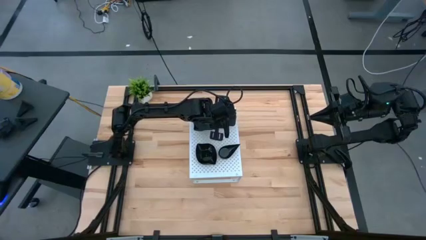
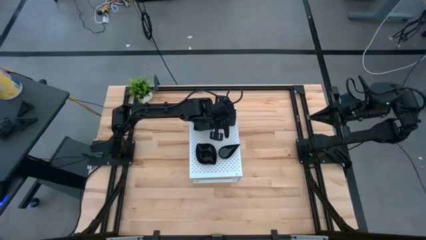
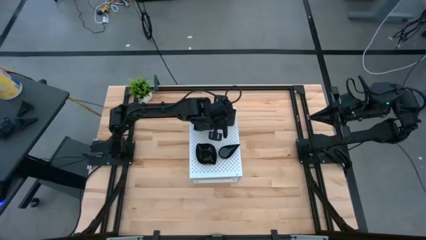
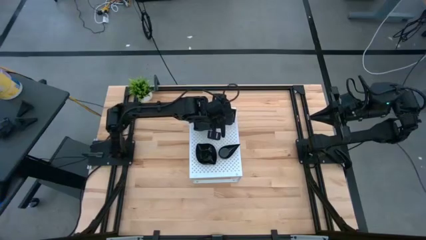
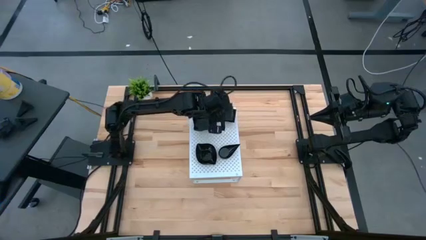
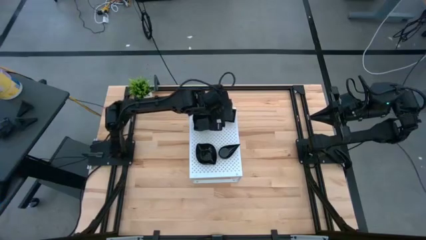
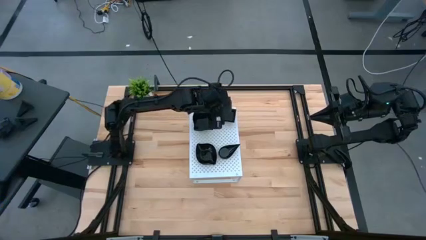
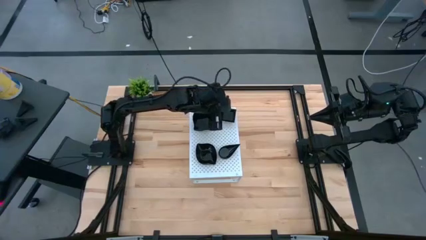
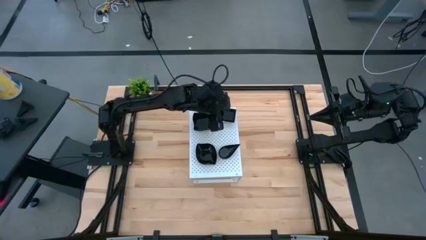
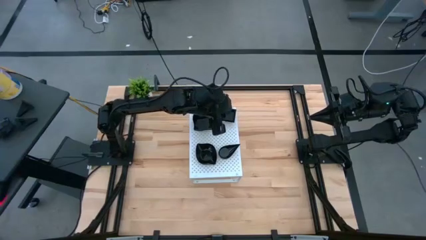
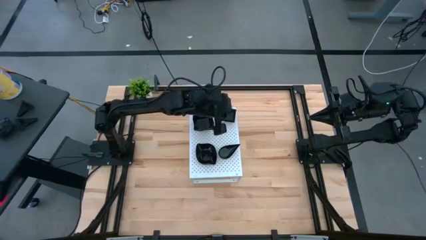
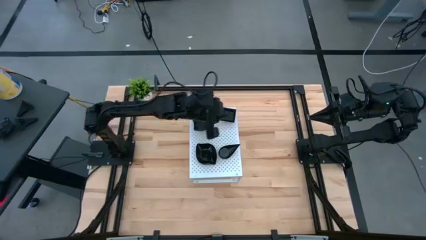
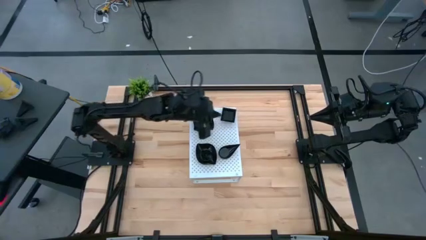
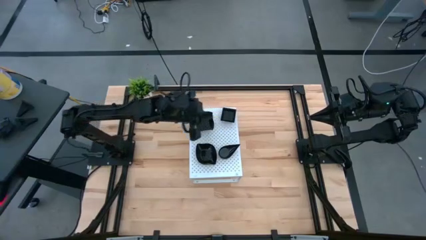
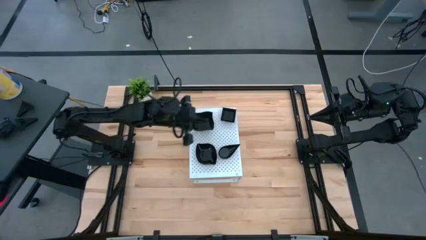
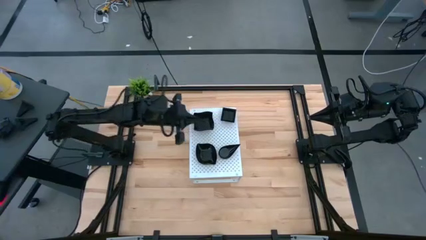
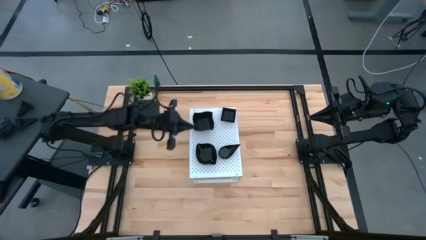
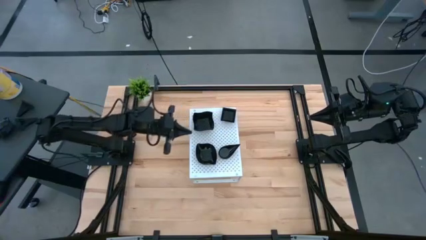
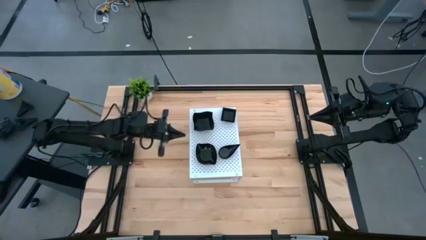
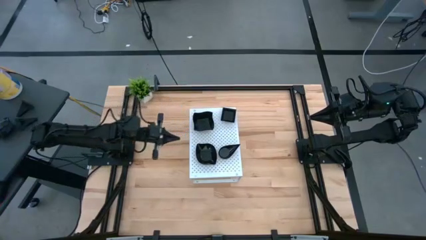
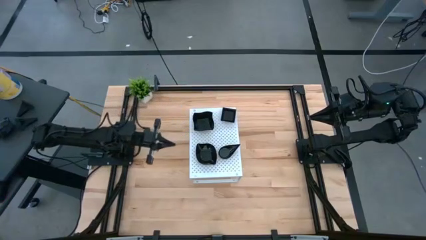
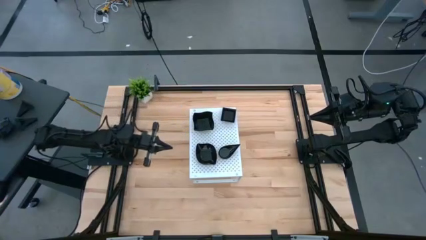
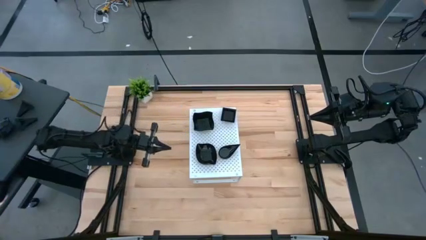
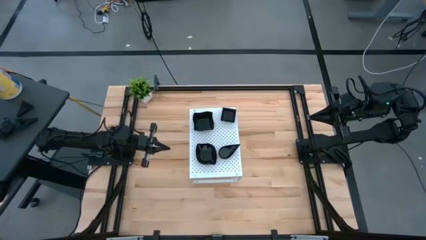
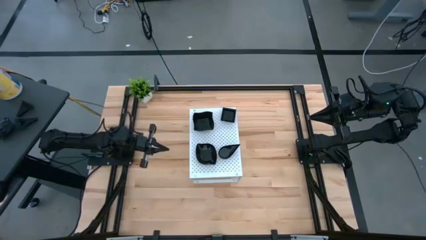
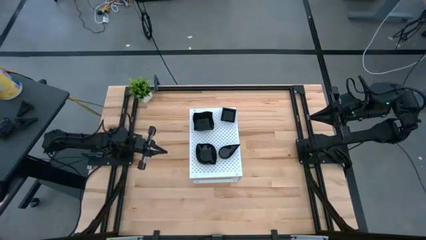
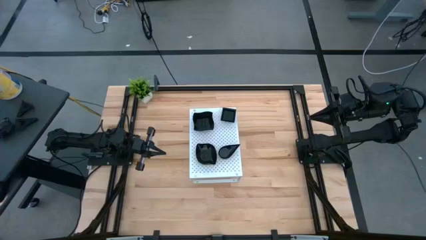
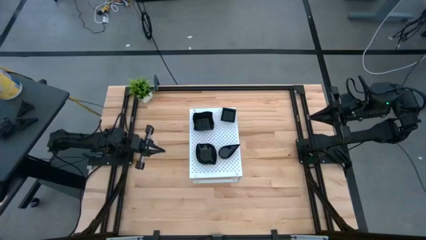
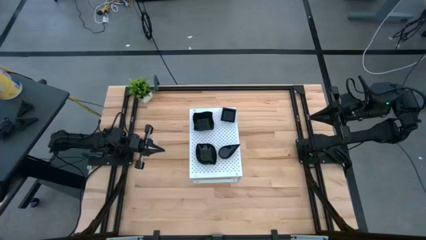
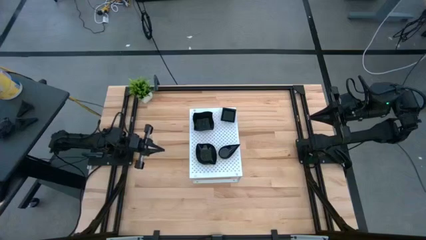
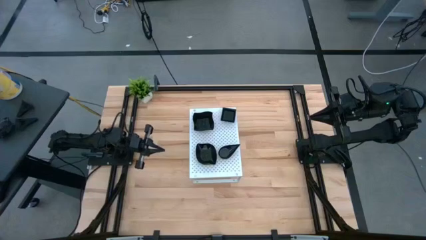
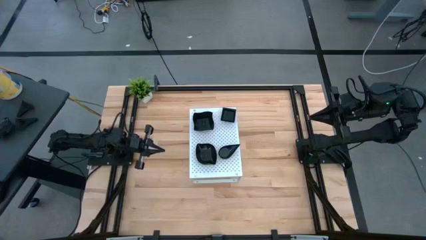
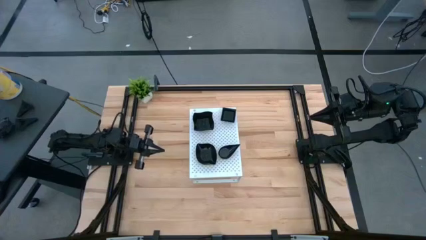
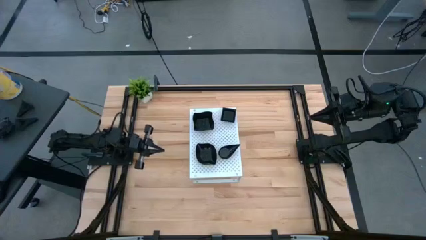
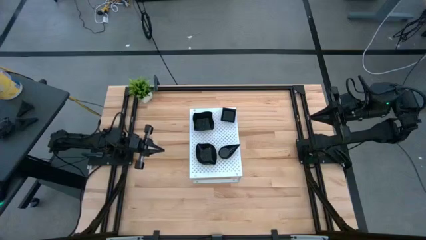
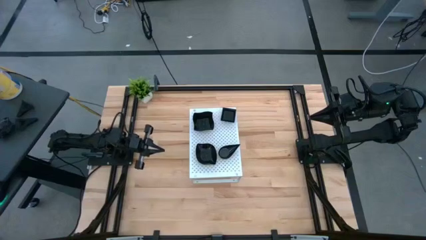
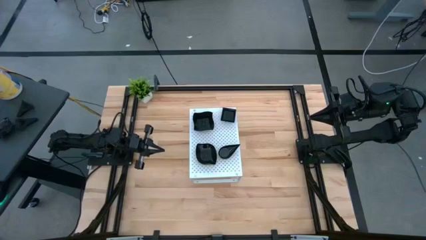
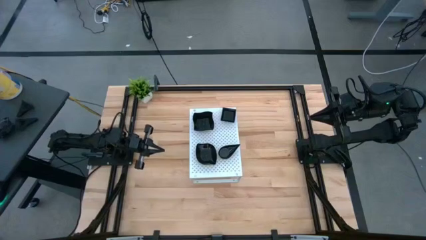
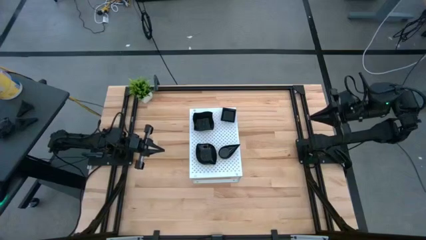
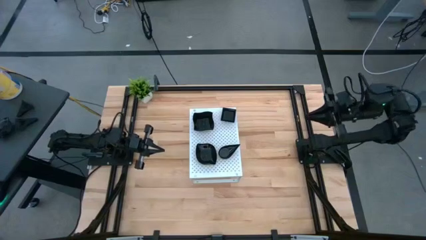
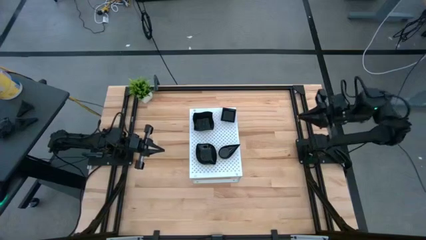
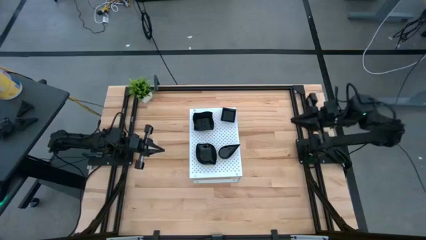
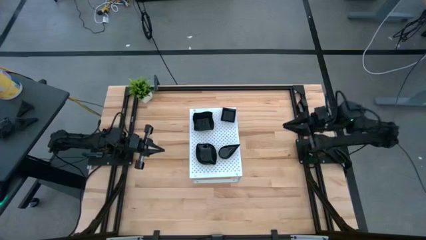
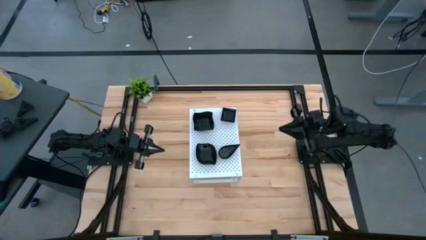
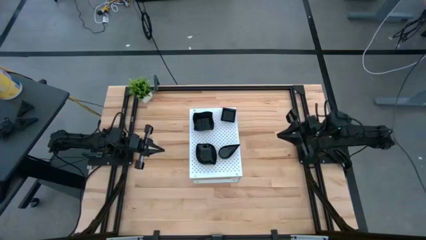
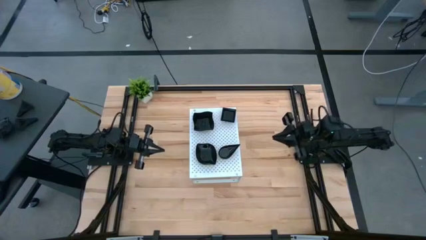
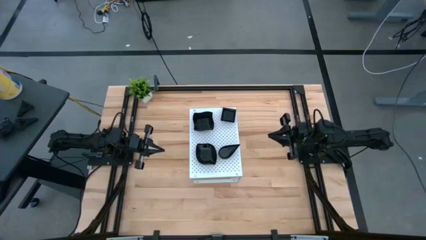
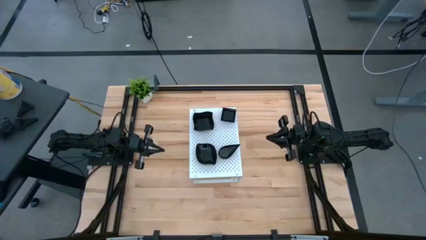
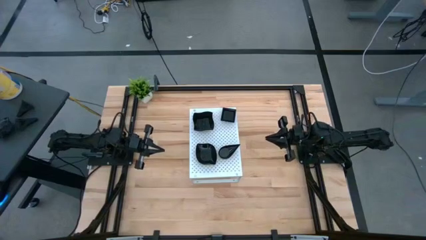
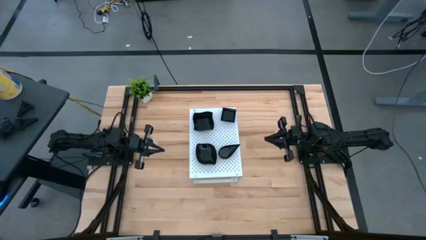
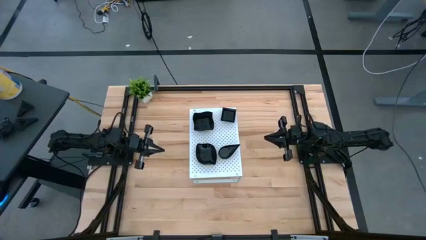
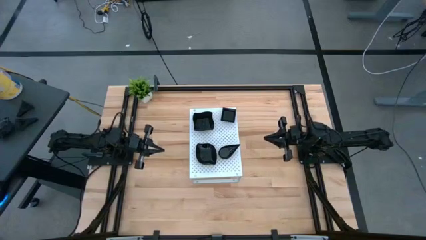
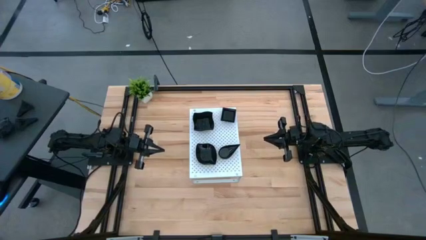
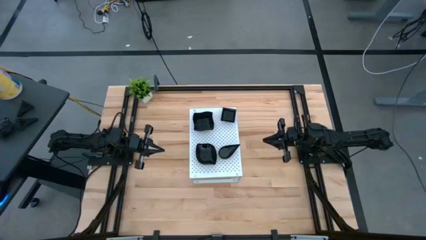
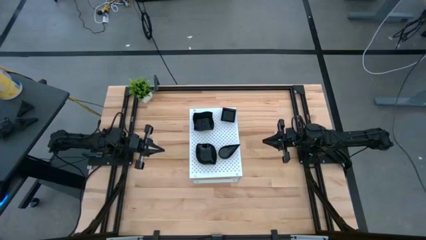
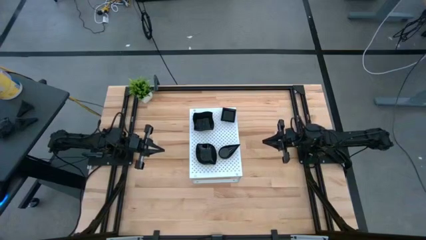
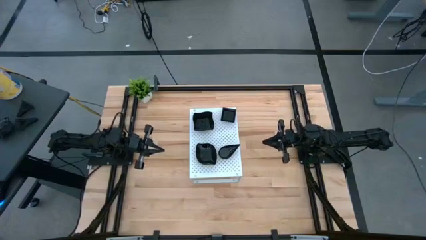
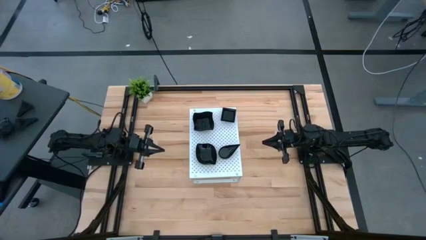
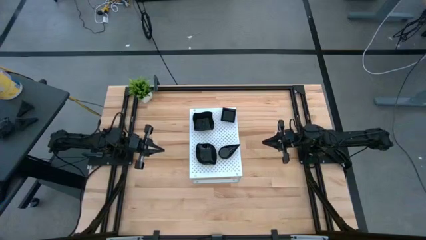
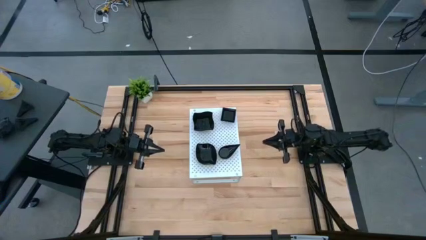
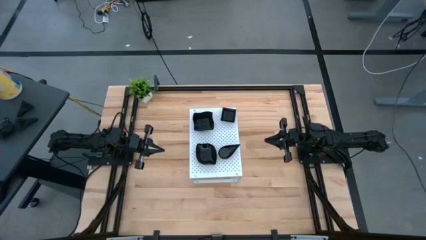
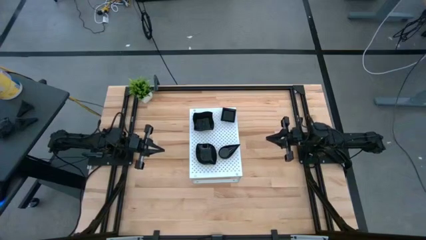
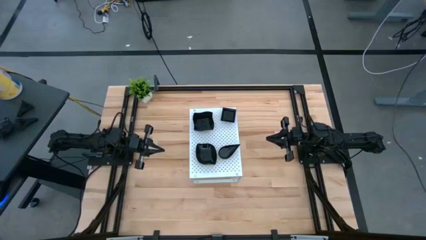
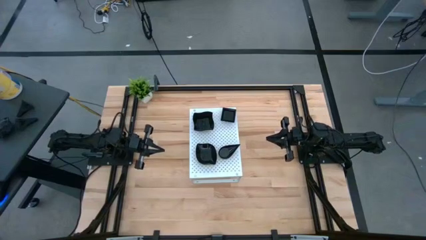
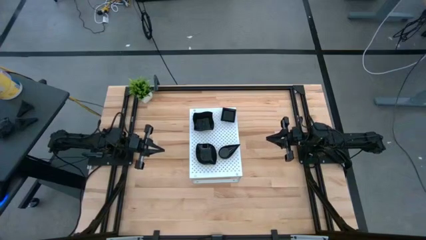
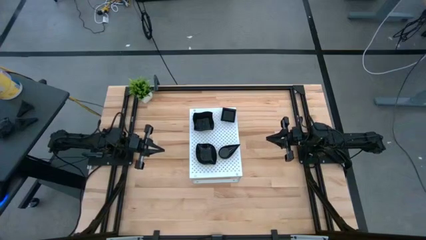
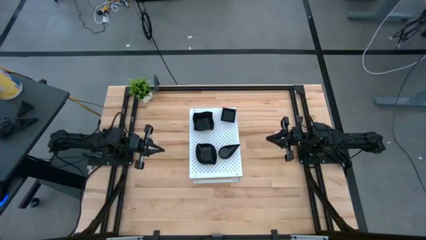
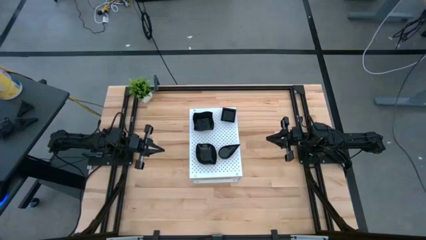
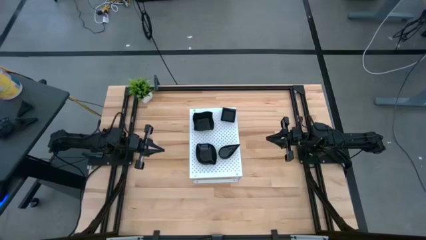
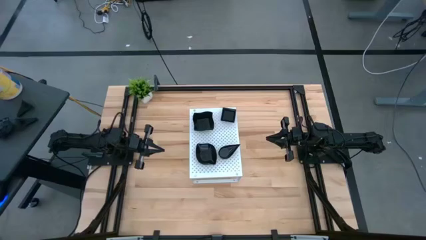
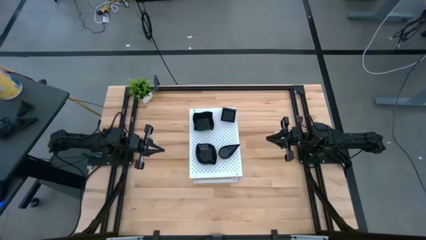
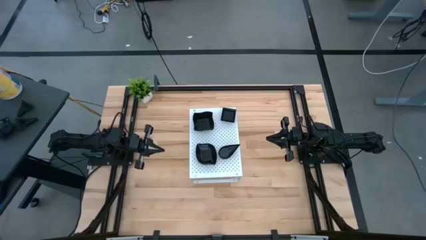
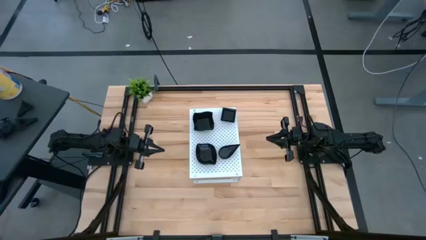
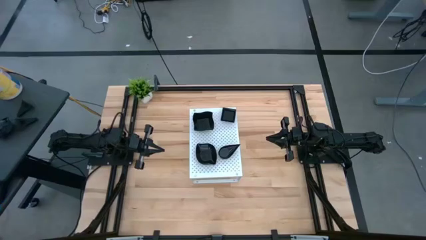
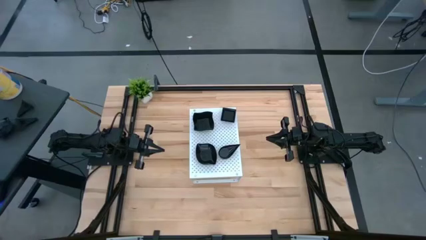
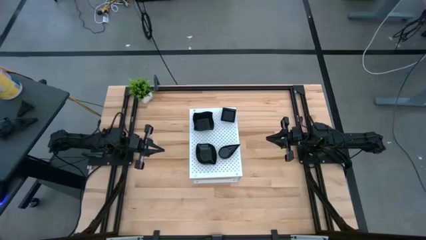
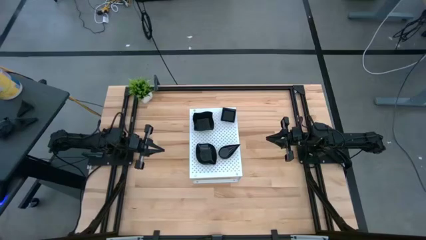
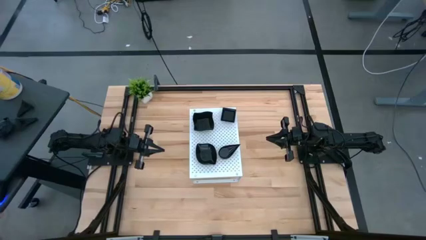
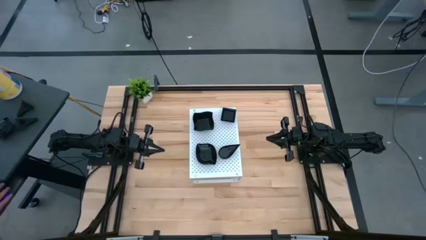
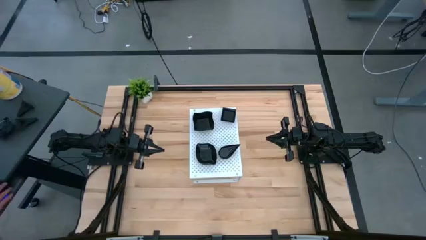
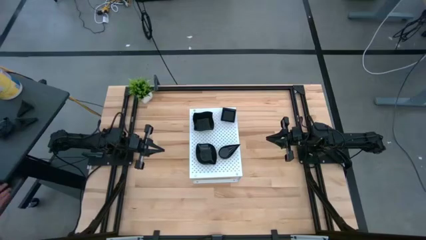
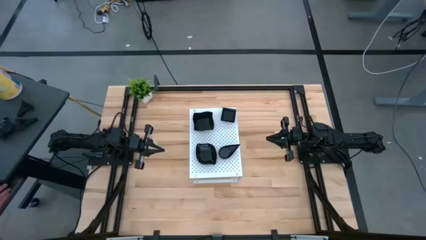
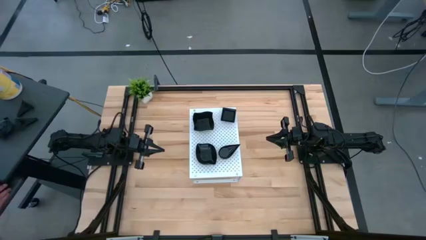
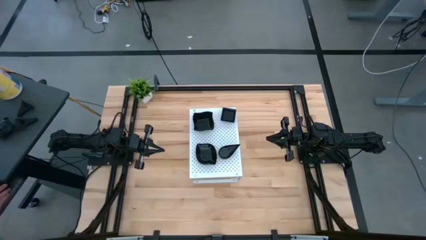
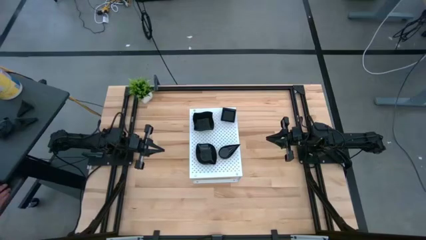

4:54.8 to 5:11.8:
Task: Pick & Place Mini shaped plates
Return to Home Position
